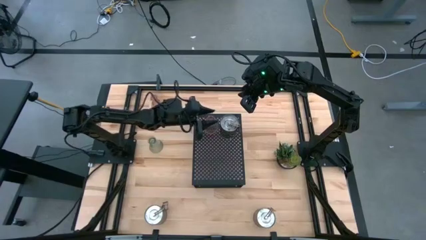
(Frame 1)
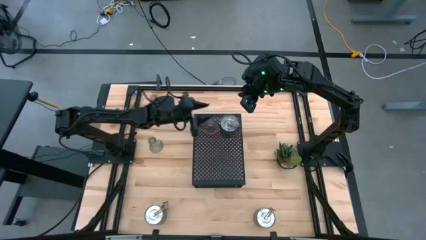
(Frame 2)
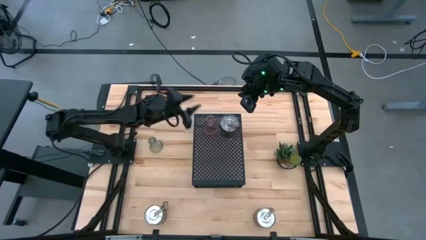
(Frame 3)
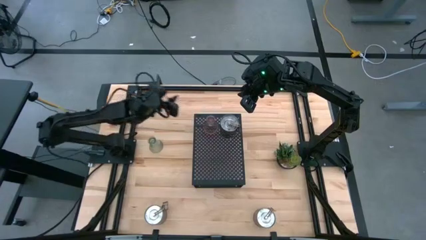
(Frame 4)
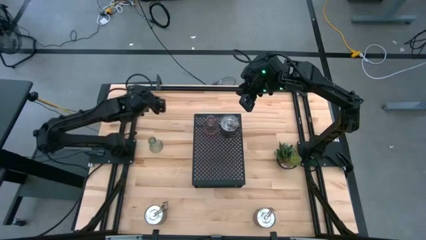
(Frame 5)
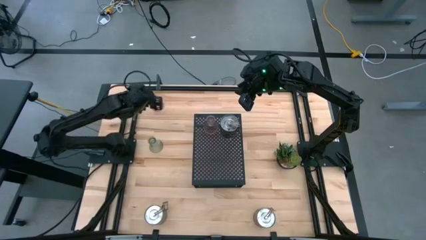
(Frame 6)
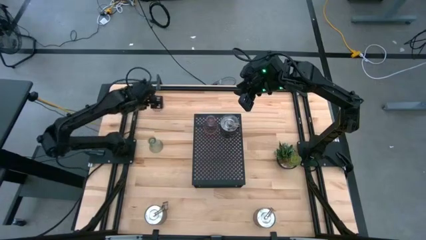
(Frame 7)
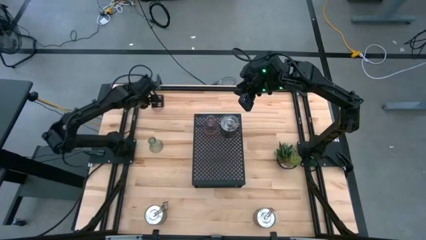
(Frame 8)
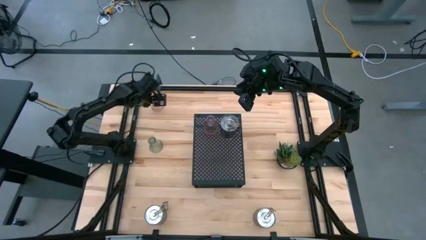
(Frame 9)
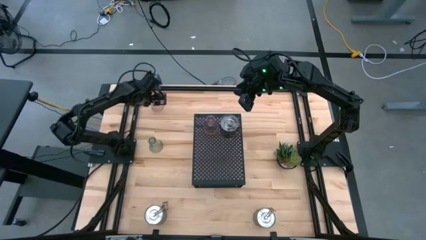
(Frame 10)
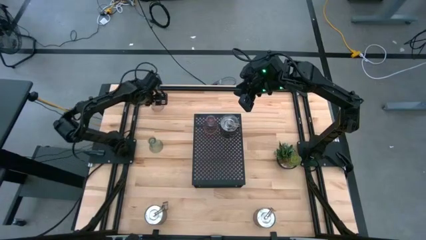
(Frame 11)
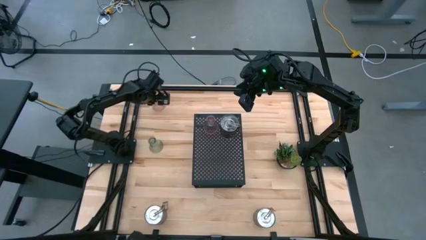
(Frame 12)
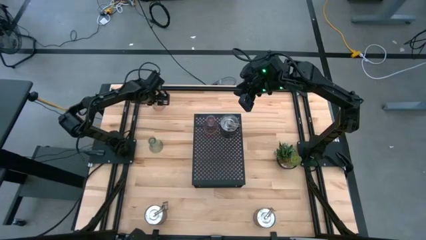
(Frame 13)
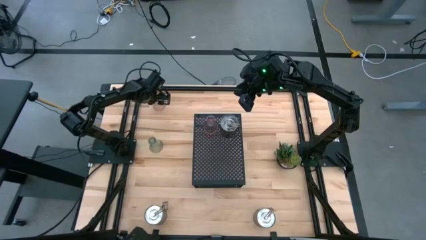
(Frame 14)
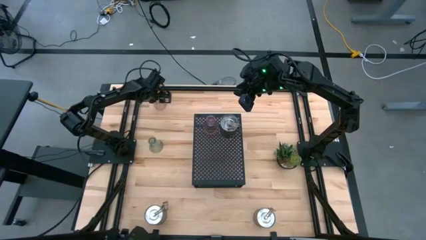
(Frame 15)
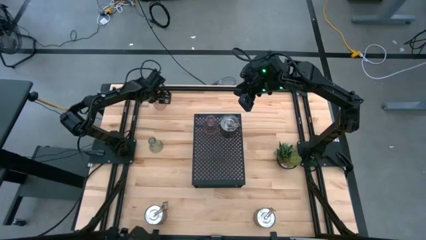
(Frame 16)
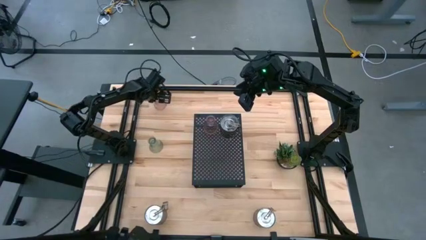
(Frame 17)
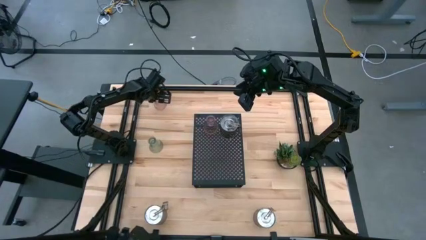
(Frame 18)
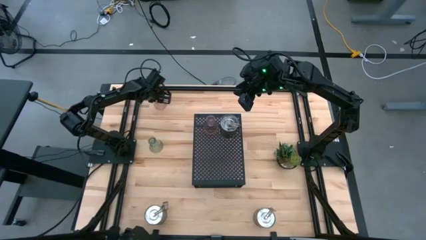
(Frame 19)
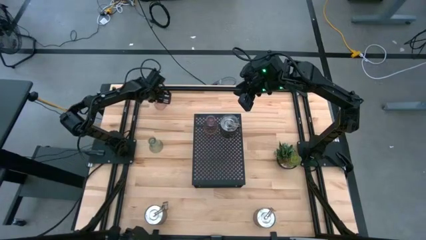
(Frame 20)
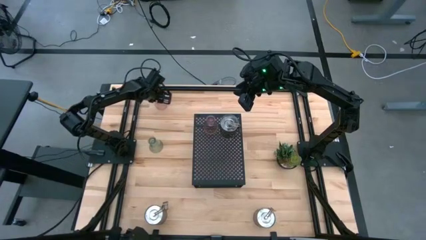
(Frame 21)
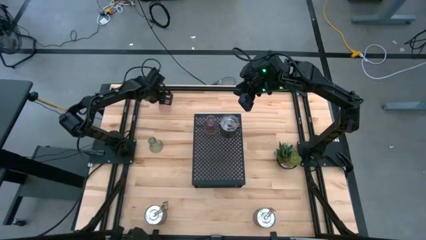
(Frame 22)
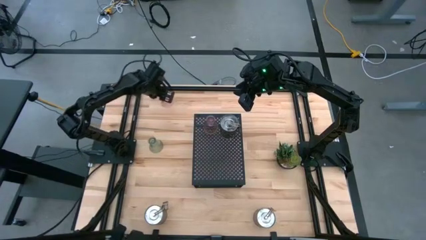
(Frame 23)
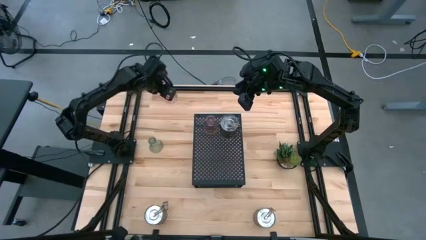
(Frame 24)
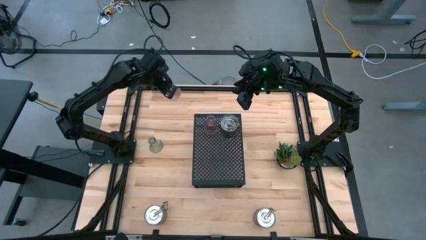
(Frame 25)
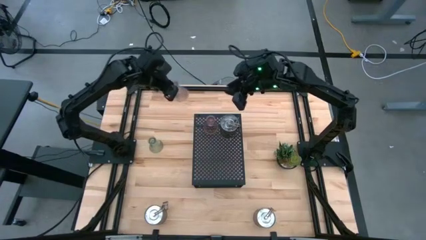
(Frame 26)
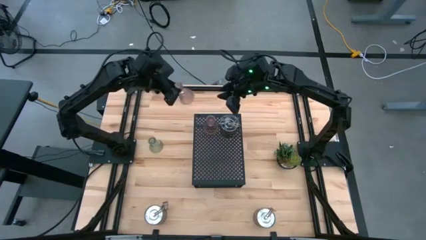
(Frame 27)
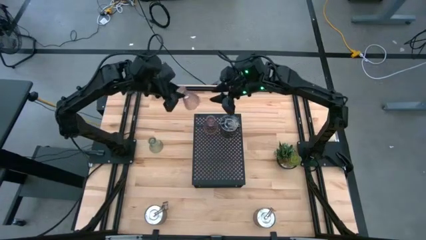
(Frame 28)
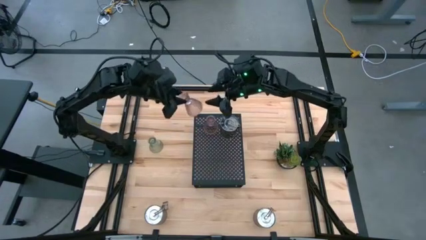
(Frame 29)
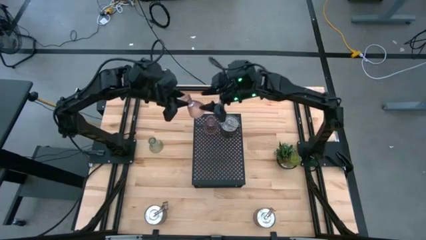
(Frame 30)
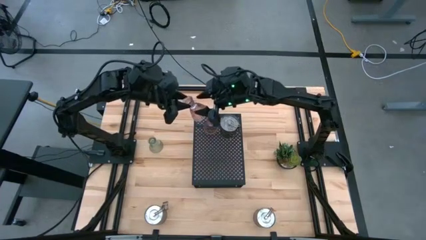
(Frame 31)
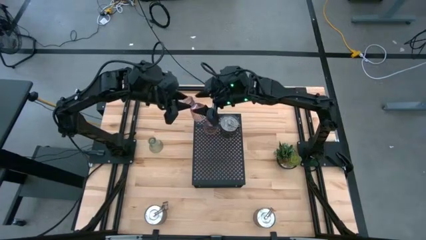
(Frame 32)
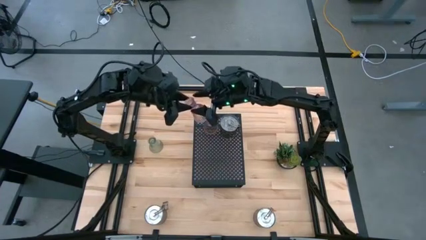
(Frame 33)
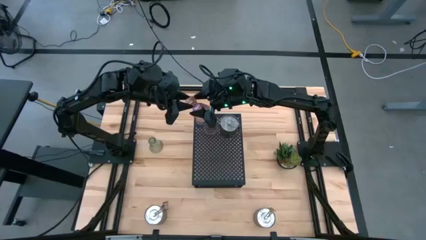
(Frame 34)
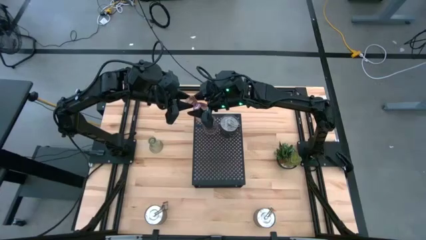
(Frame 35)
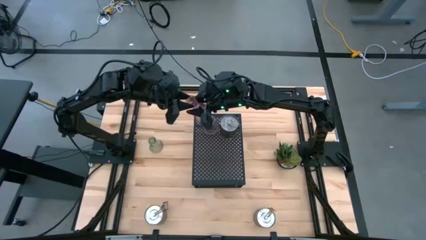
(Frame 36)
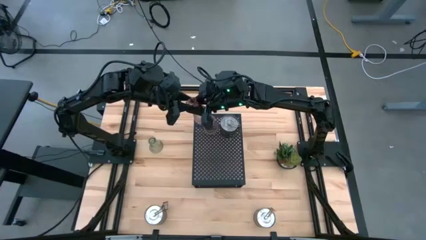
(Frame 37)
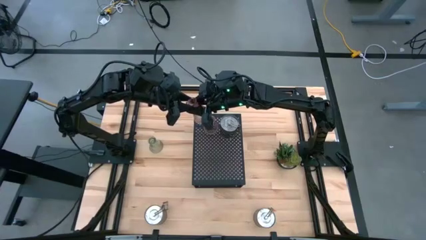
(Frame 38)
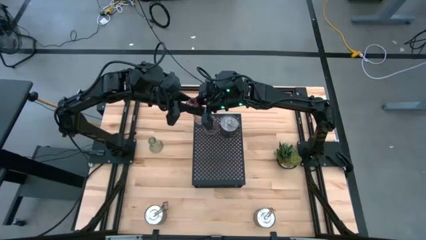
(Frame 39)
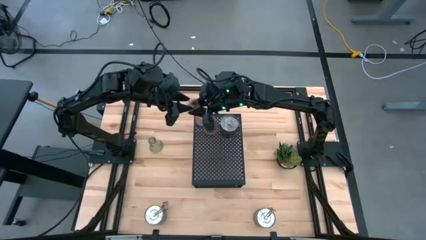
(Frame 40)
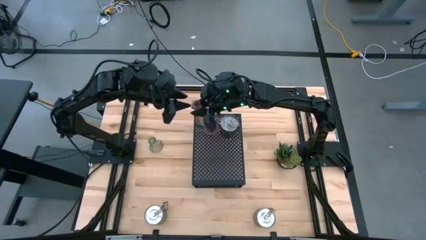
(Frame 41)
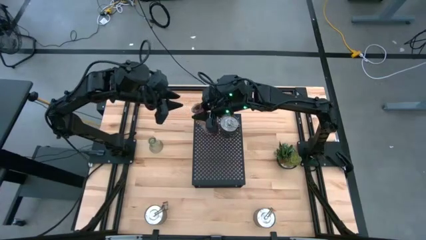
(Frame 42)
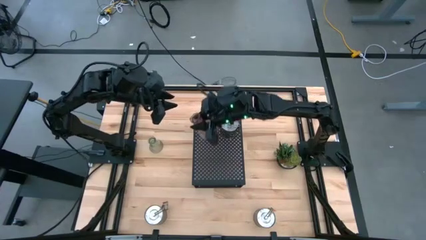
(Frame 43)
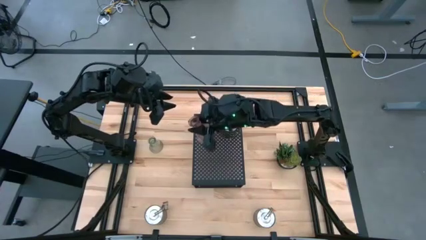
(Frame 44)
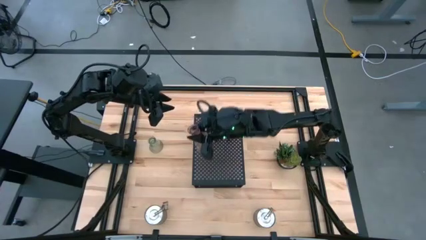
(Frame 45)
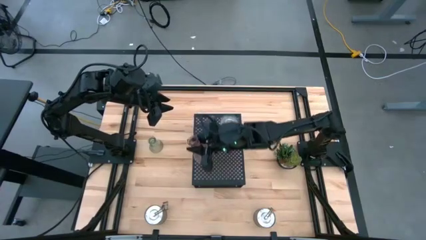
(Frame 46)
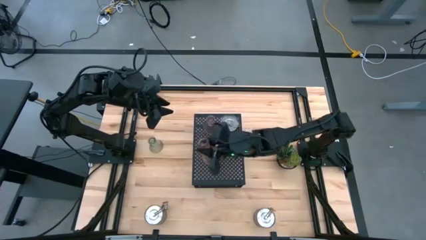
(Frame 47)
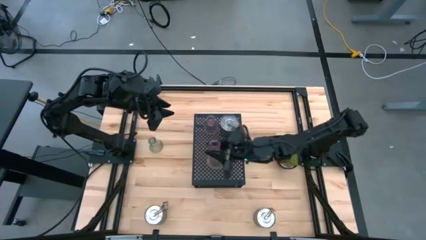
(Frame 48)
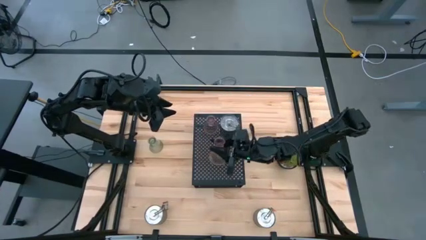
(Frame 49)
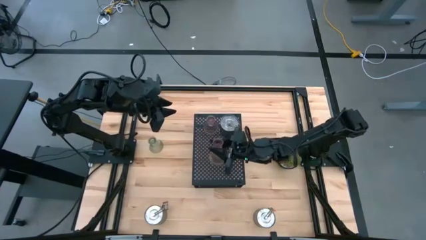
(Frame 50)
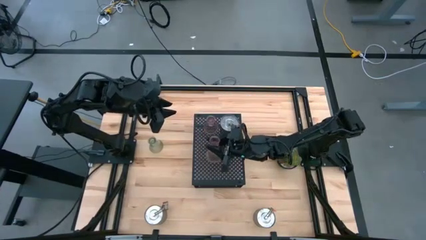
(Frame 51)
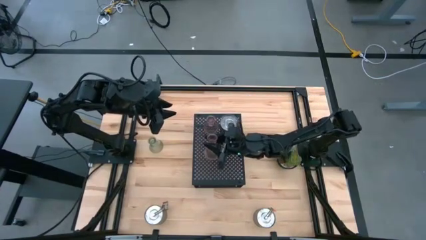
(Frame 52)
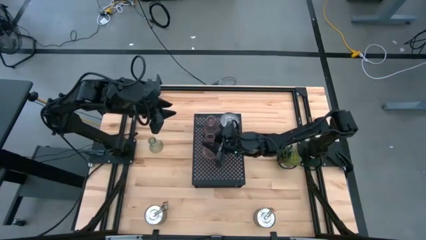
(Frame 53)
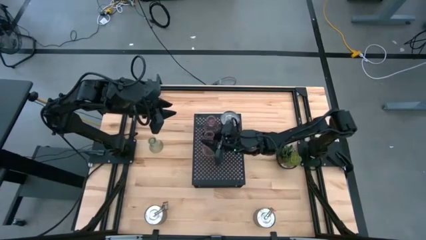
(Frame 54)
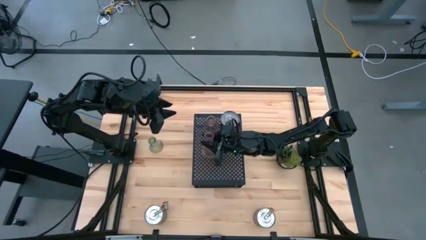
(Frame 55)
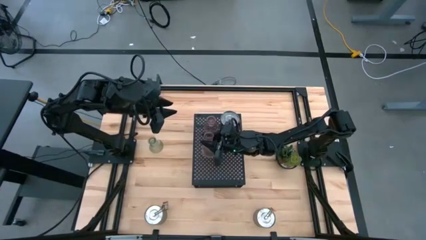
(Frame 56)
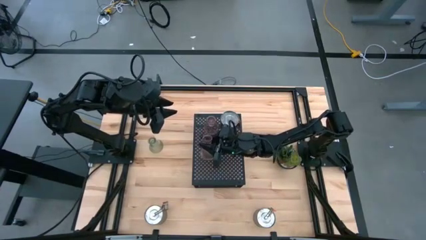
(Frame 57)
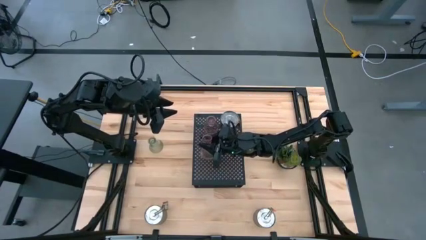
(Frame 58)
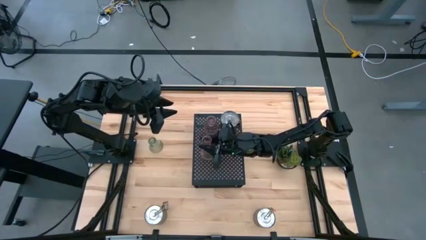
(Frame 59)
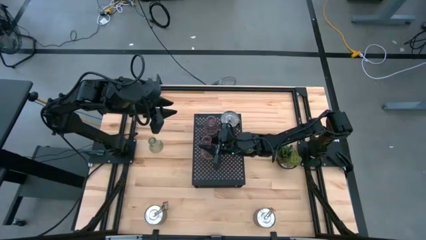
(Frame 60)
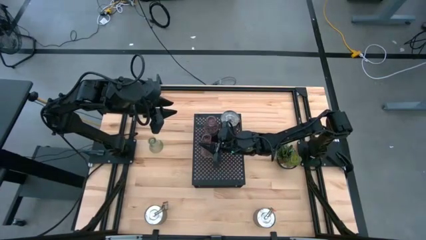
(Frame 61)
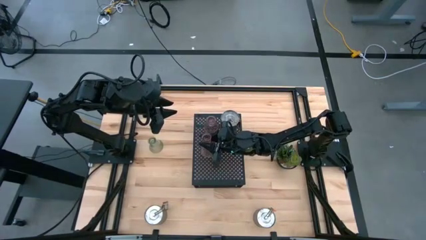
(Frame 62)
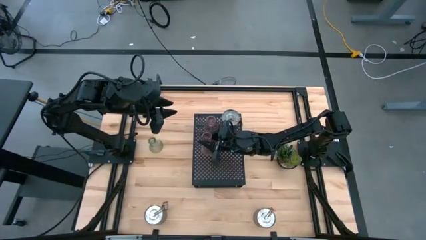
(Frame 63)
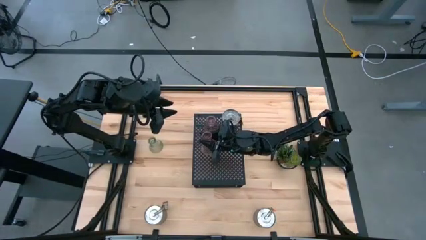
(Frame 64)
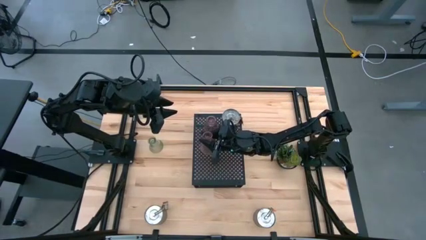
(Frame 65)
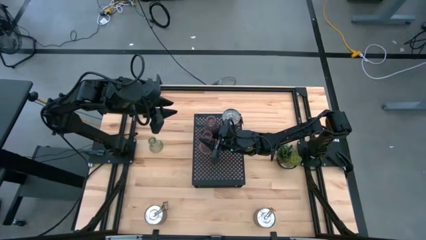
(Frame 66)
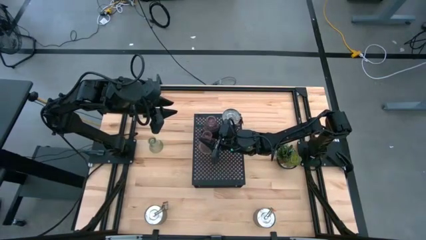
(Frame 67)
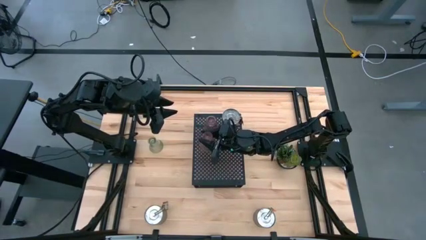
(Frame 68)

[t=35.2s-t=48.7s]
Task: Pick & Place candle stick holders
Put the pink candle holder on the shelf

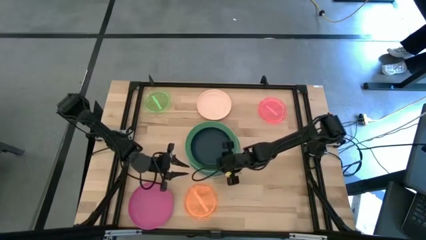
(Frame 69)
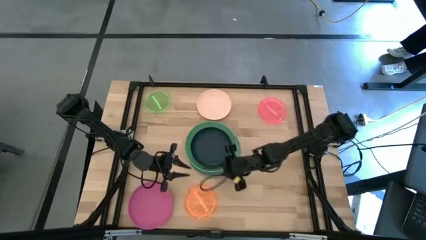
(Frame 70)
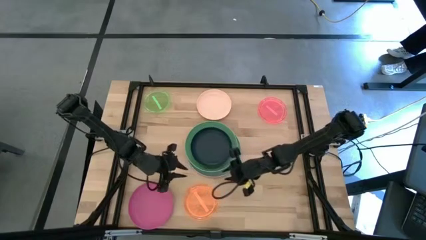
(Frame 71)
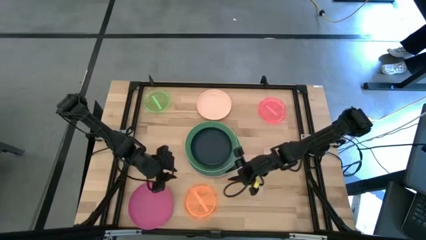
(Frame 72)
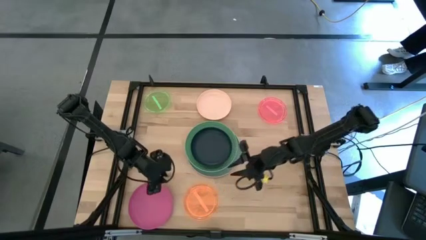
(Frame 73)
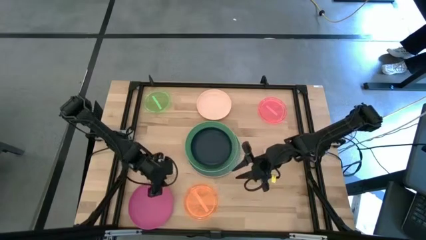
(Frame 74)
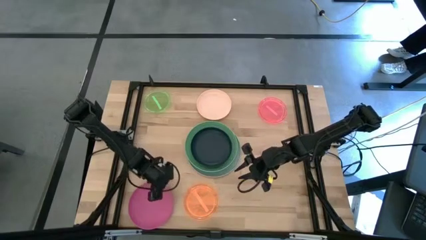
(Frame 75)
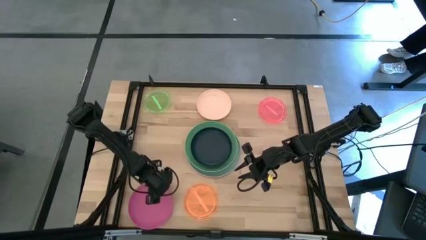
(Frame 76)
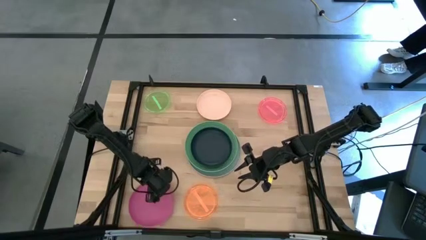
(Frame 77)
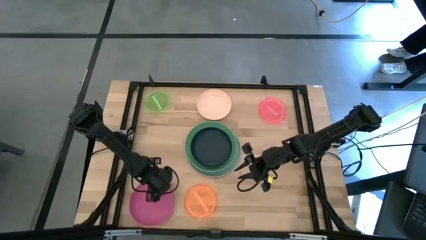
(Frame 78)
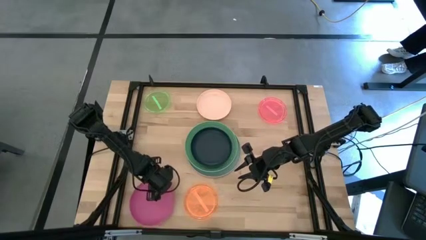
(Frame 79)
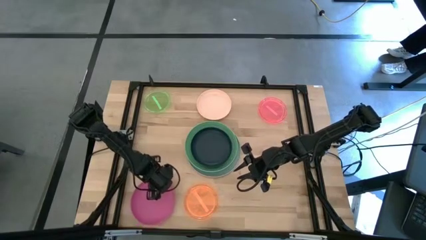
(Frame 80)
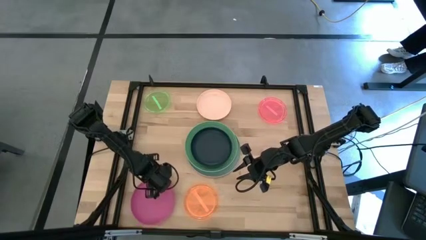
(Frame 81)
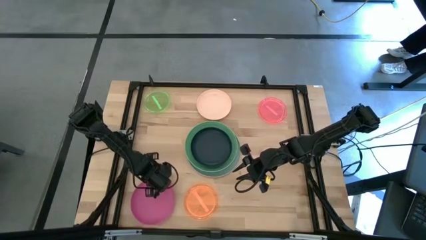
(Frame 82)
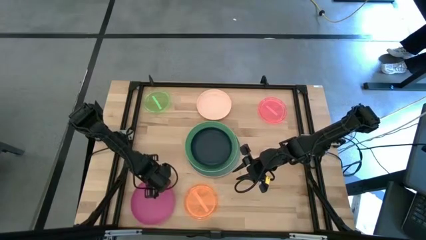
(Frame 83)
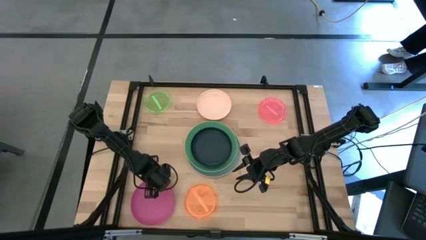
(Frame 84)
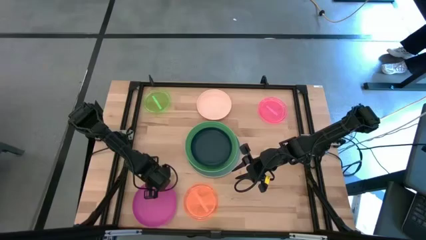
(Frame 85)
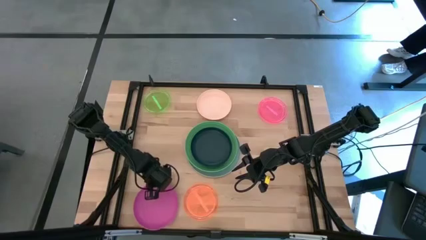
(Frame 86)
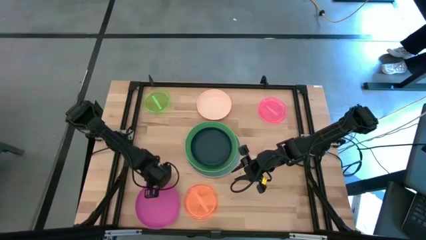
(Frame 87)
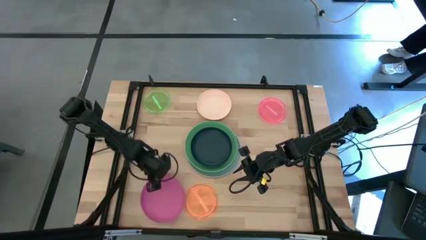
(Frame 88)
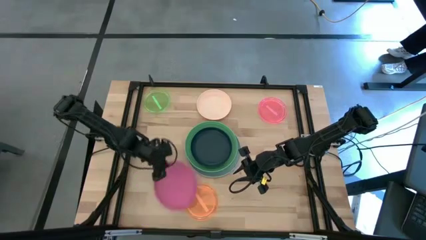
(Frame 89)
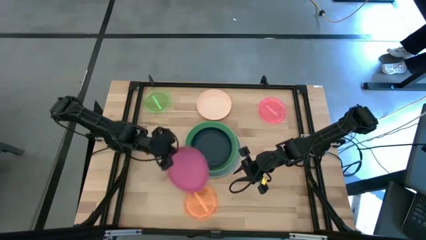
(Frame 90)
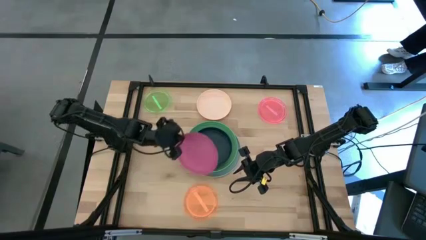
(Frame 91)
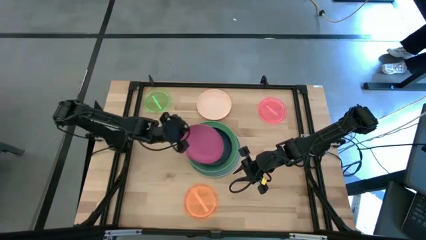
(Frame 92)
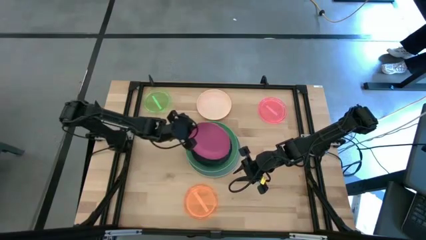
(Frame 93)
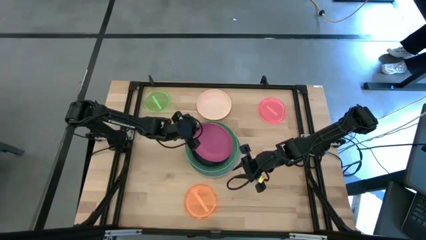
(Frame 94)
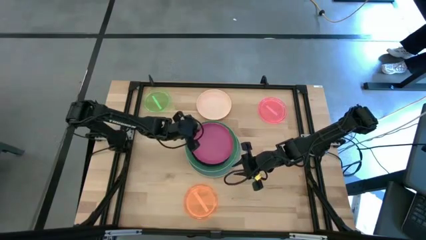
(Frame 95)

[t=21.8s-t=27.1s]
Task: Stack plastic plates
Stack the pink plate on top of the black plate
